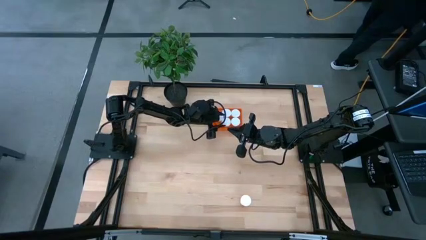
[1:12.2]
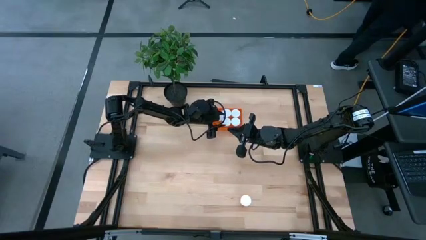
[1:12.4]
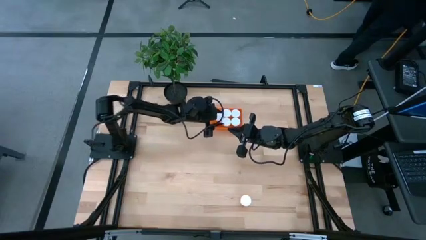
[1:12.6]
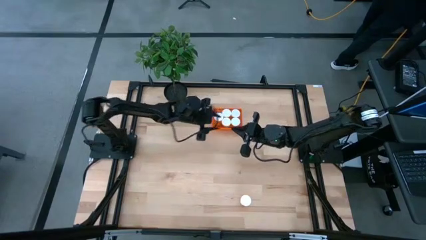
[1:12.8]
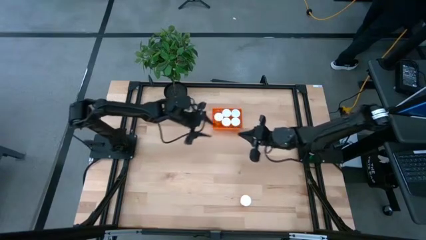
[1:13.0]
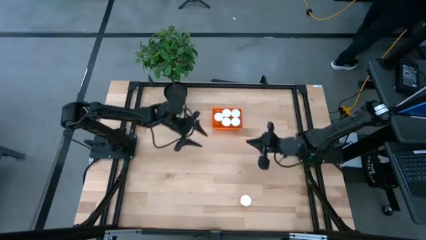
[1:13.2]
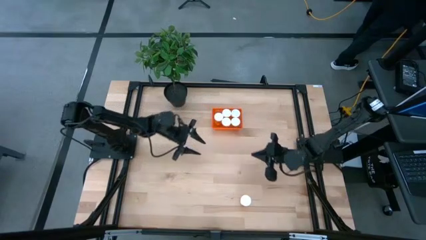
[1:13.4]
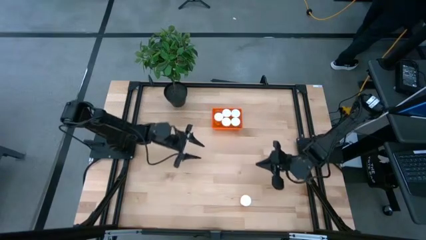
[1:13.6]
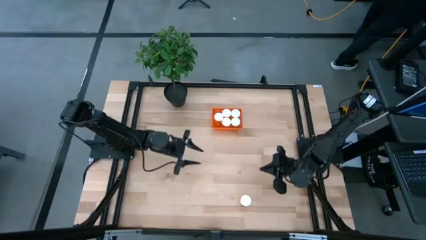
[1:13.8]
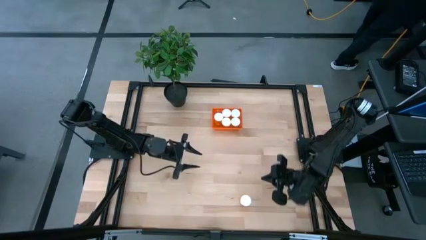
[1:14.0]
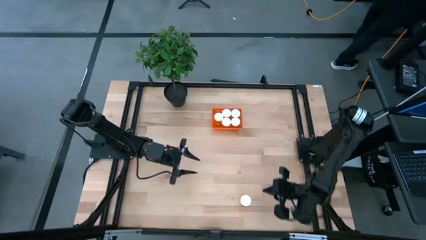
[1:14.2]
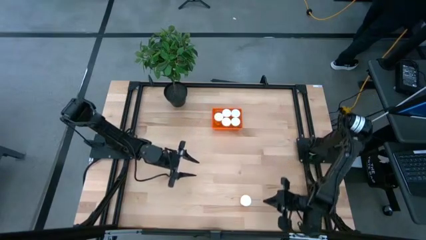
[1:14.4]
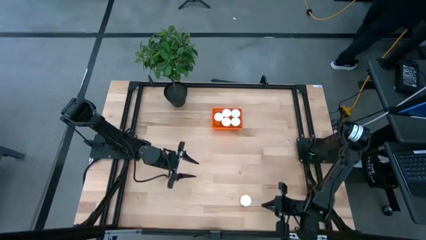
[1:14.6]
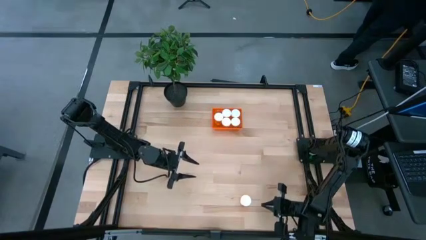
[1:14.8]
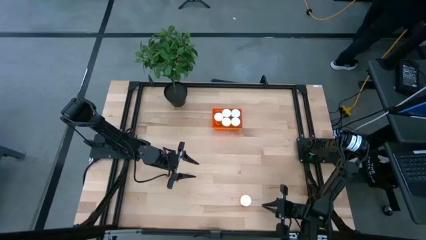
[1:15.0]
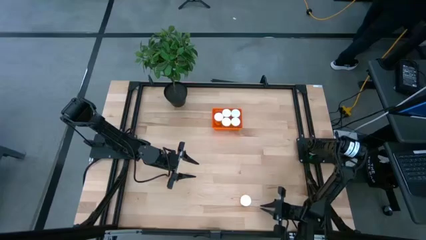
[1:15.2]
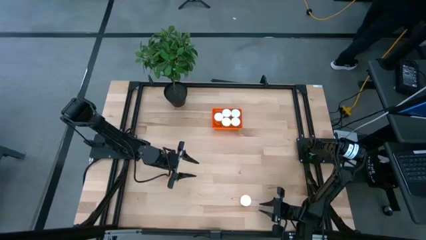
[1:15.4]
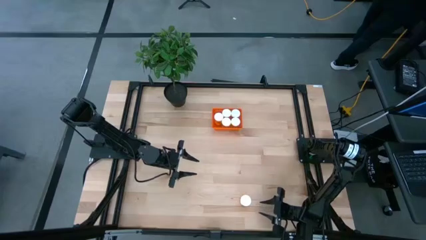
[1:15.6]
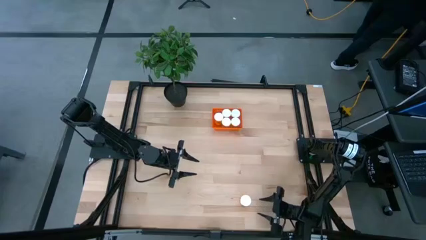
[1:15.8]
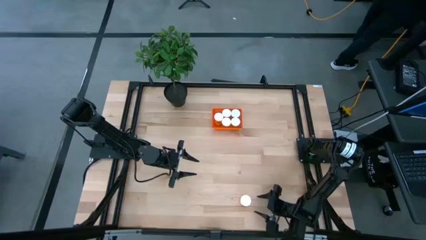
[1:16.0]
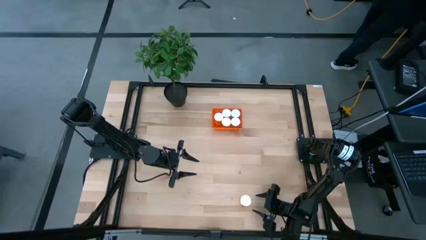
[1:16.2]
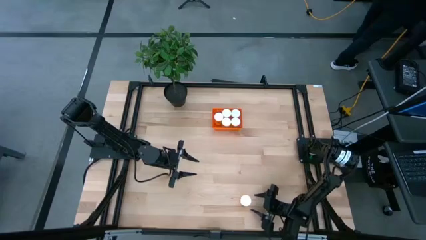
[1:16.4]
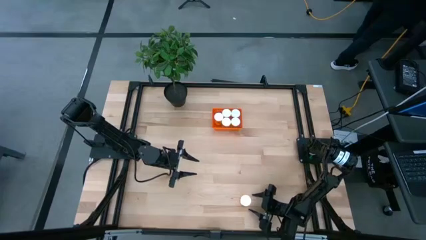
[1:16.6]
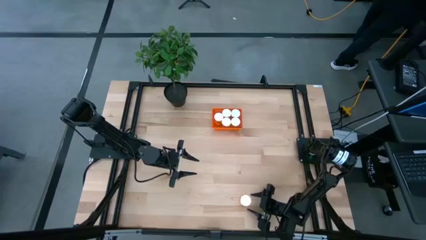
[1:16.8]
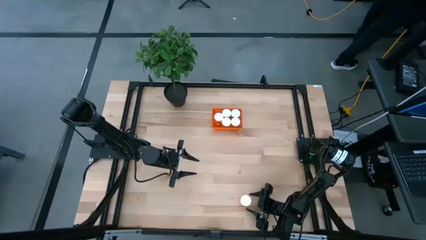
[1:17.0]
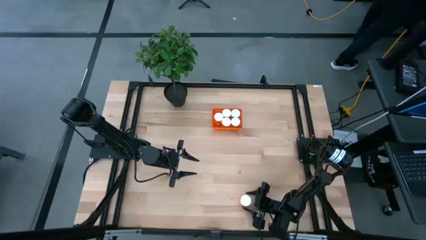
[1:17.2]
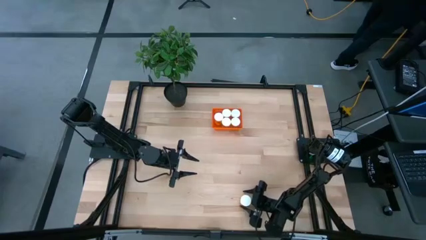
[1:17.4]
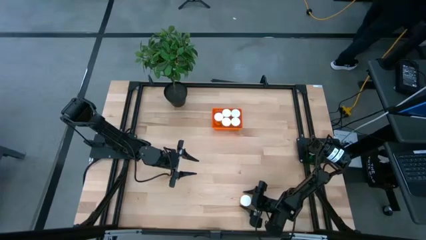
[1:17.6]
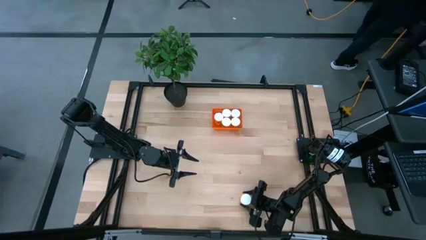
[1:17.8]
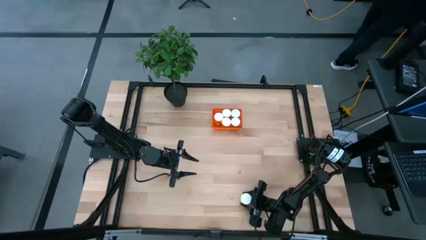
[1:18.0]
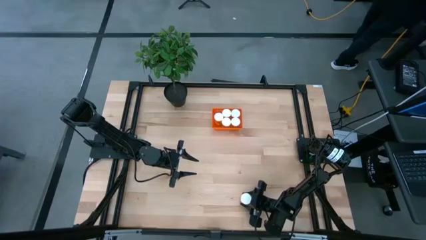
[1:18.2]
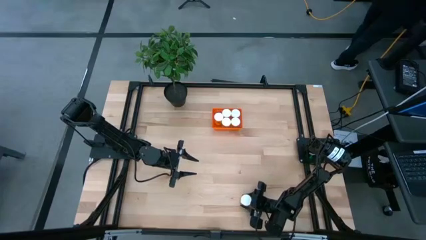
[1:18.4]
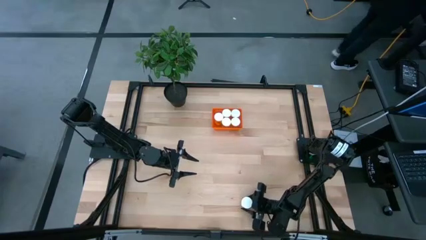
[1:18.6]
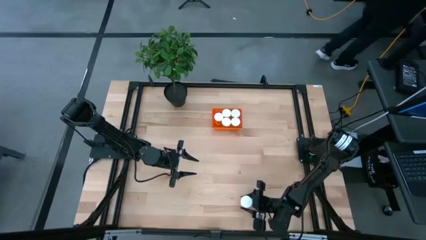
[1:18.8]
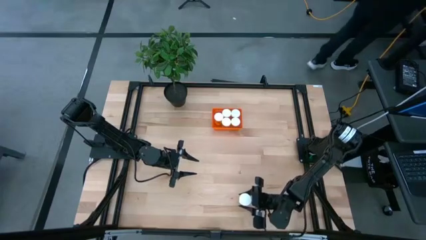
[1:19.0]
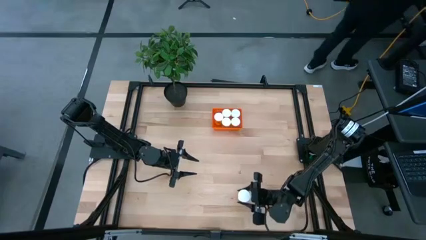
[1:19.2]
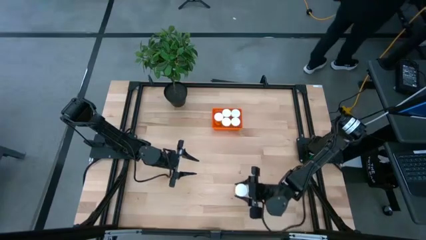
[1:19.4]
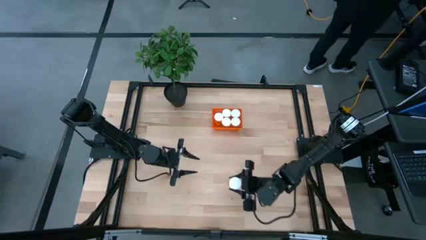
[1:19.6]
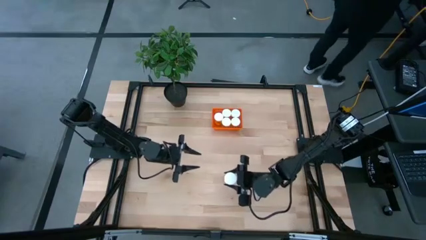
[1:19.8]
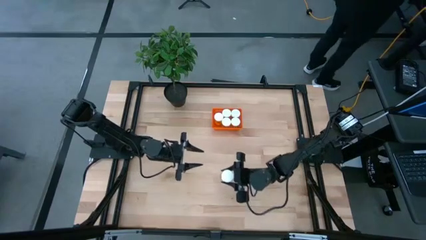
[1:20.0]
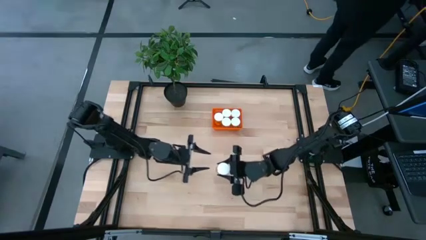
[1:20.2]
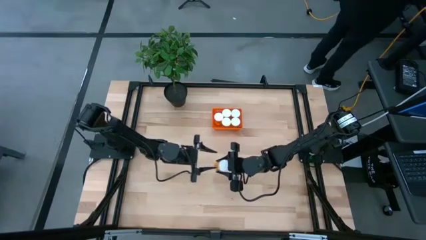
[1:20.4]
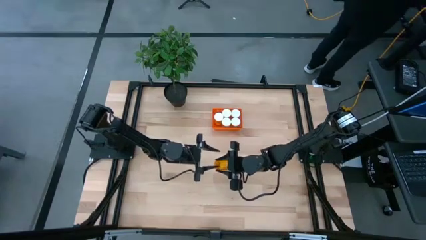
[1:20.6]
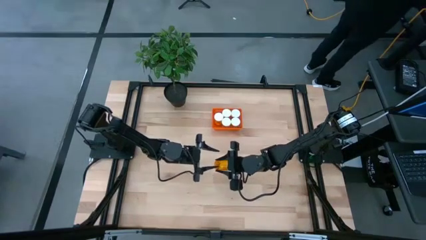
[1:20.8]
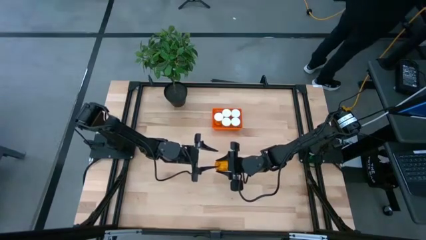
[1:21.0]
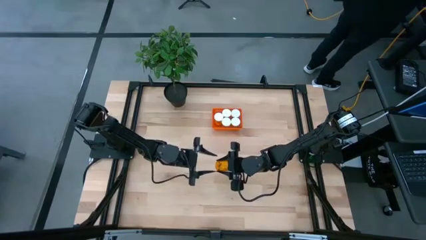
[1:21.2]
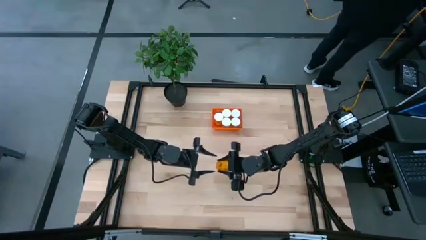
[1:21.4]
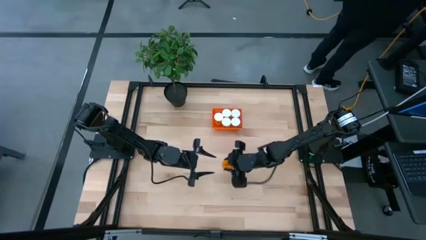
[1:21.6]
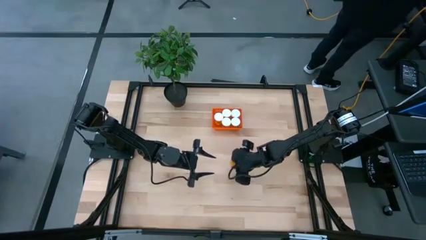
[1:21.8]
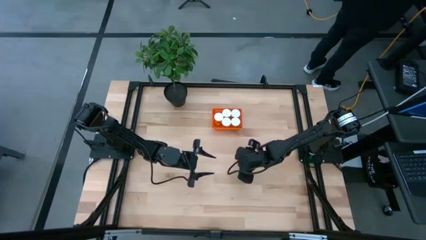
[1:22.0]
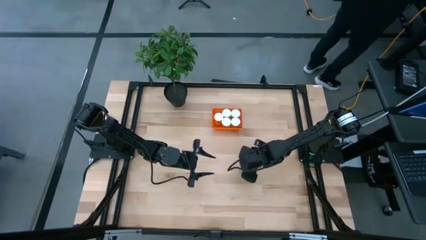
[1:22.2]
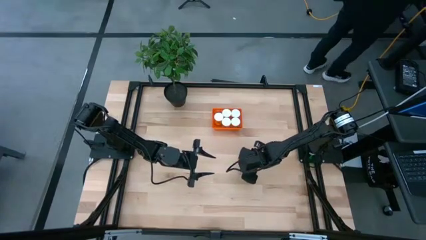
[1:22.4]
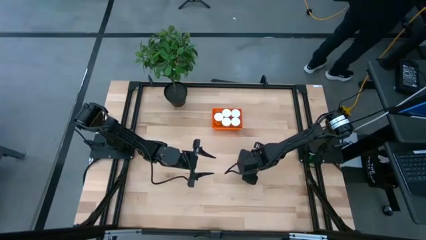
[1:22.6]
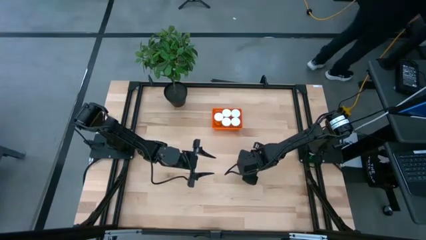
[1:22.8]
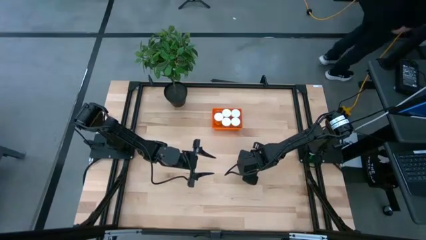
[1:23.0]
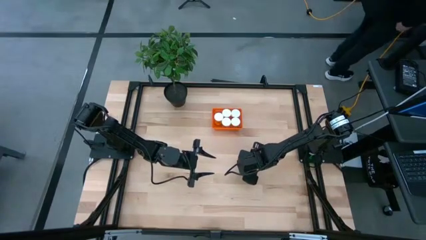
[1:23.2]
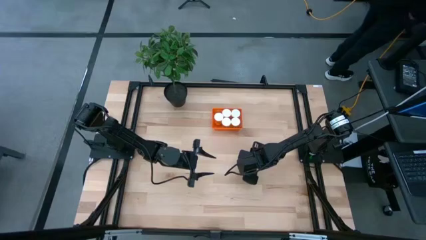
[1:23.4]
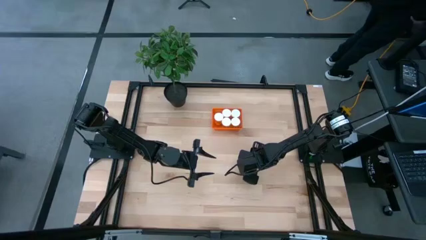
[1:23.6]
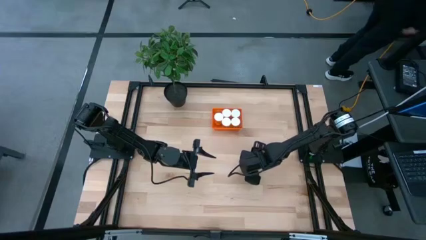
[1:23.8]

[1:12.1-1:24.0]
Task: Pick and place pill bottles into a basket
Put the orange pill bottle into the orange bin
